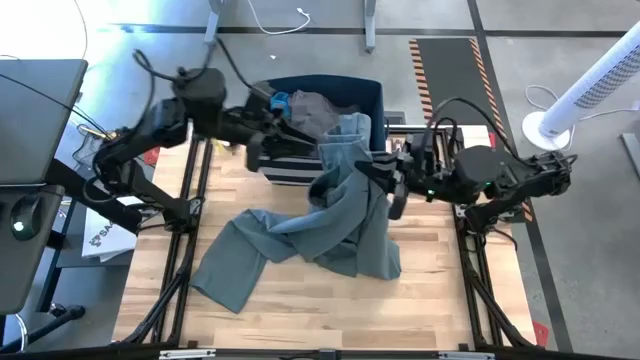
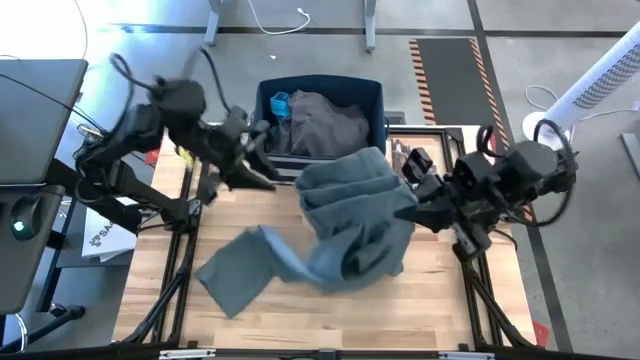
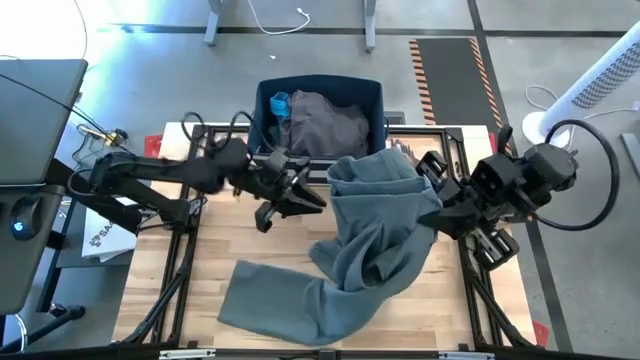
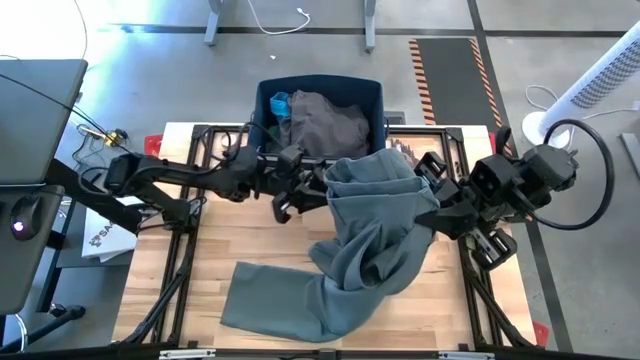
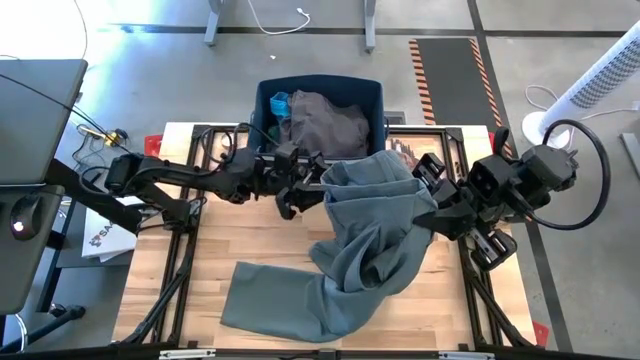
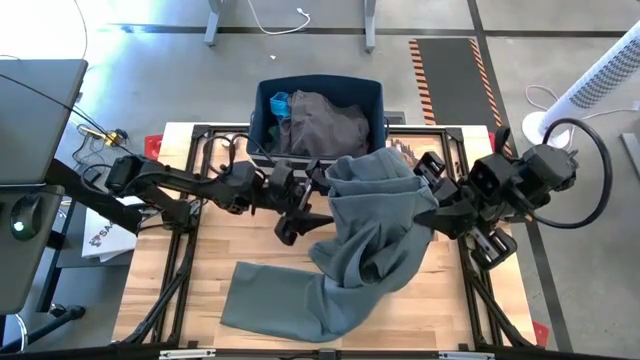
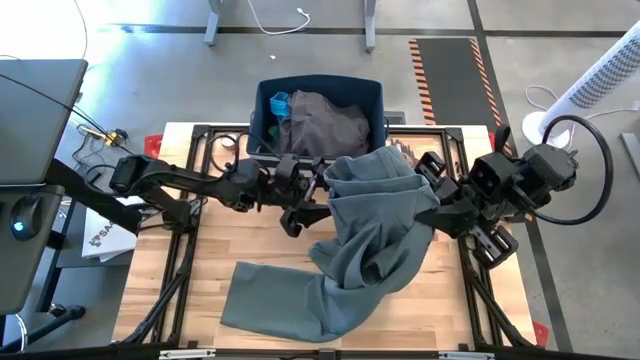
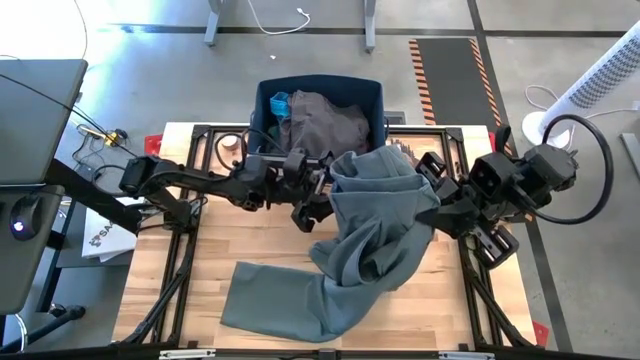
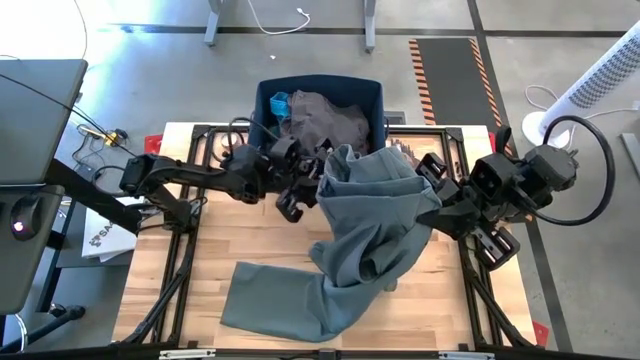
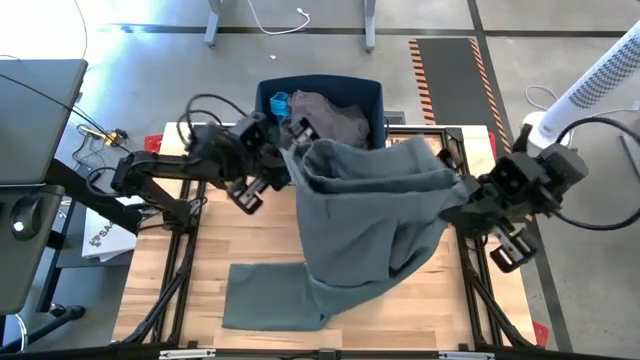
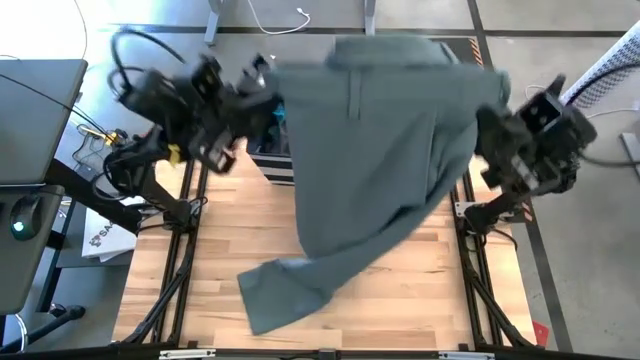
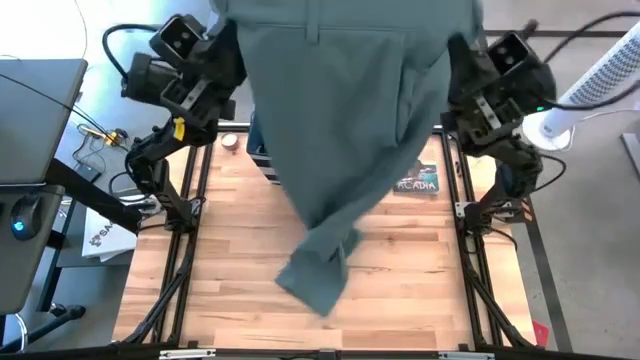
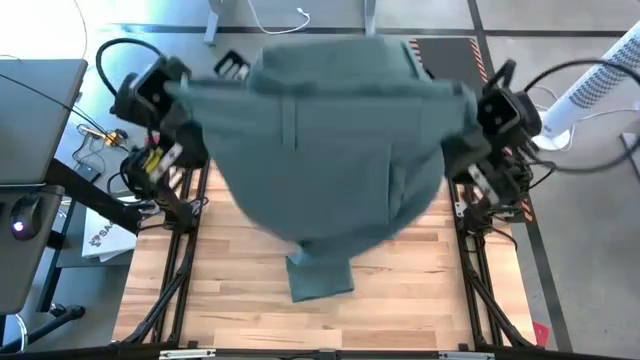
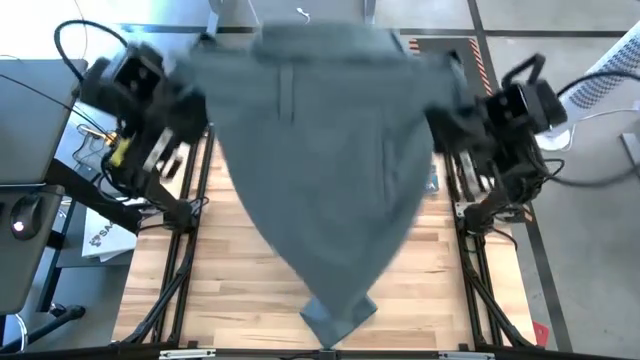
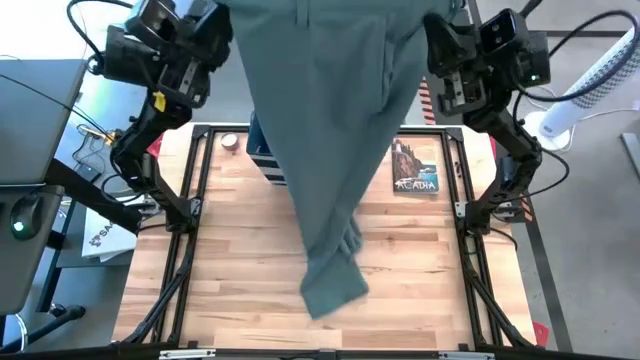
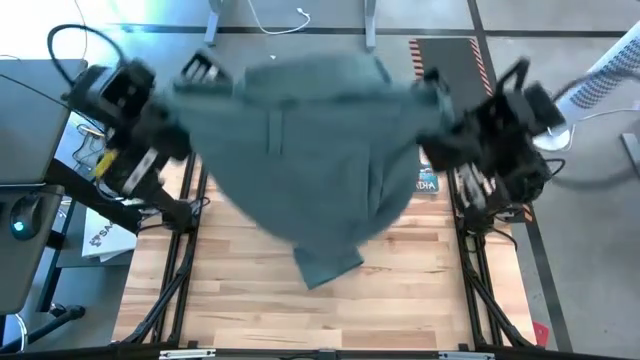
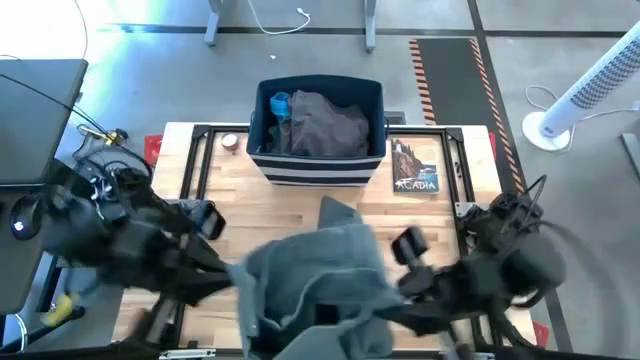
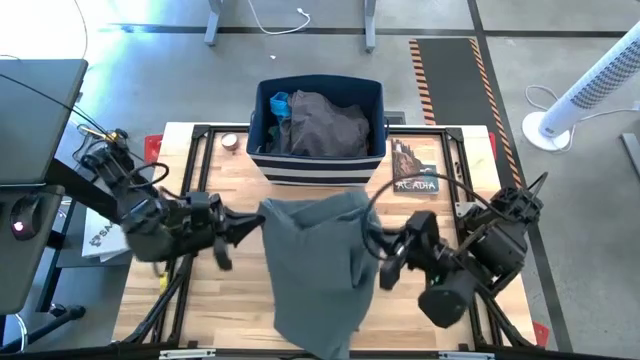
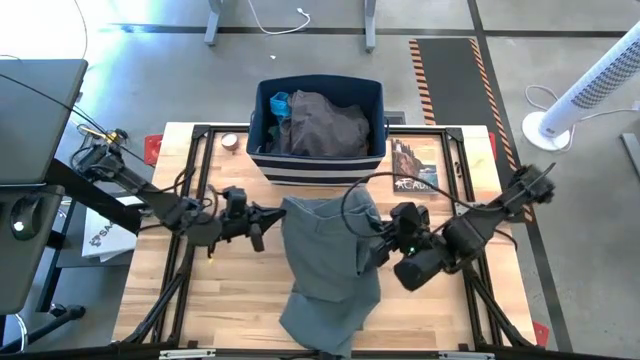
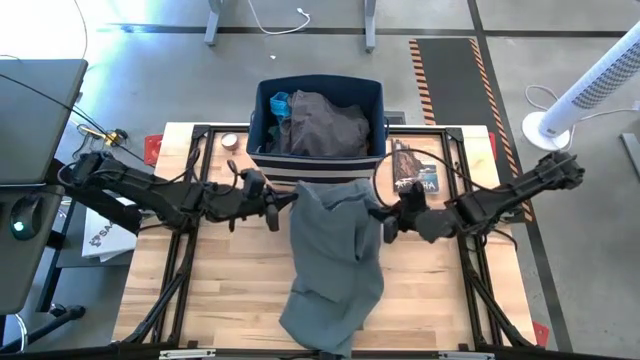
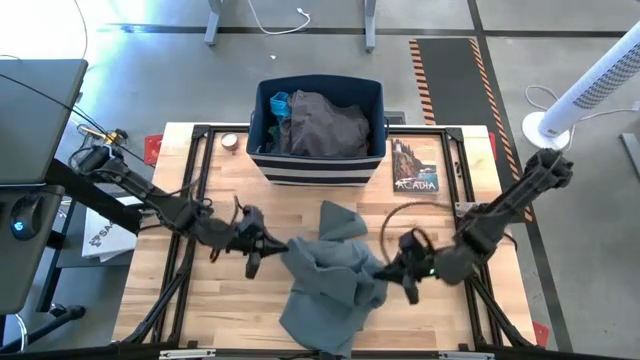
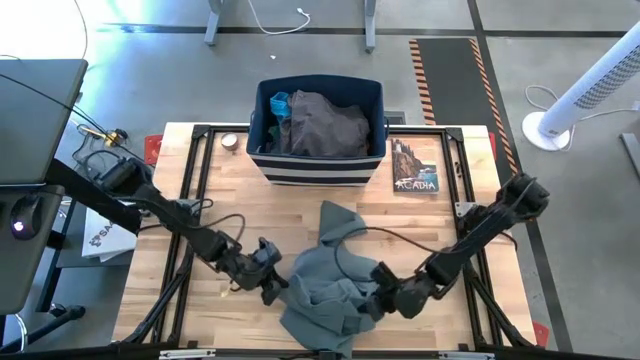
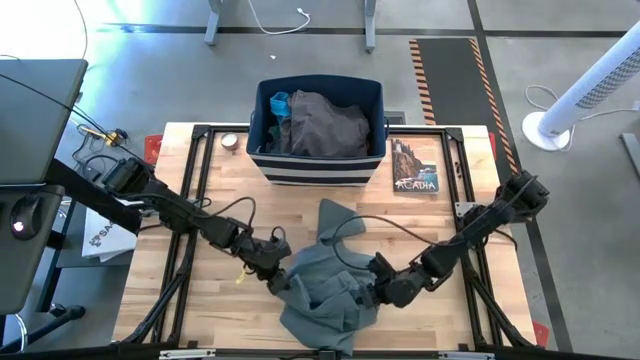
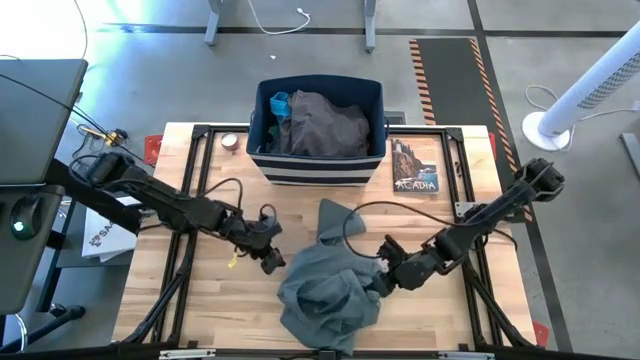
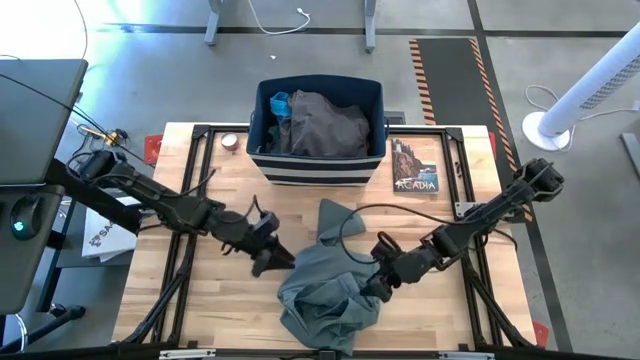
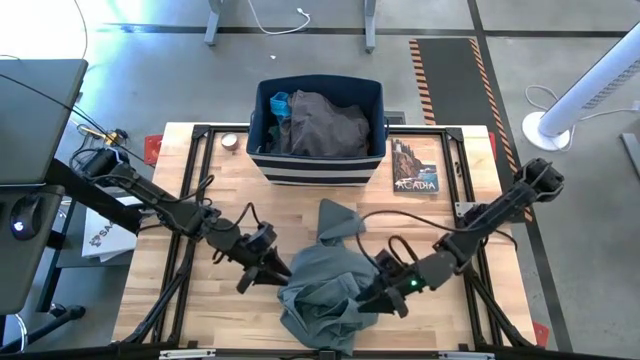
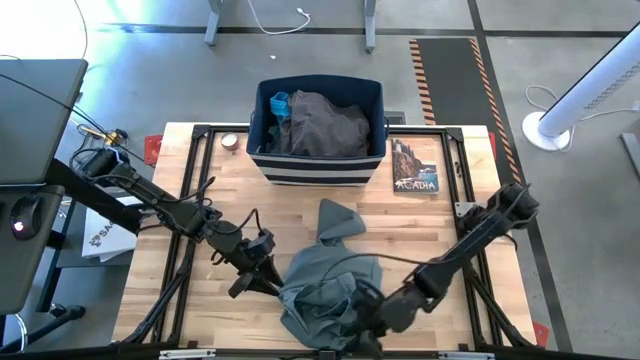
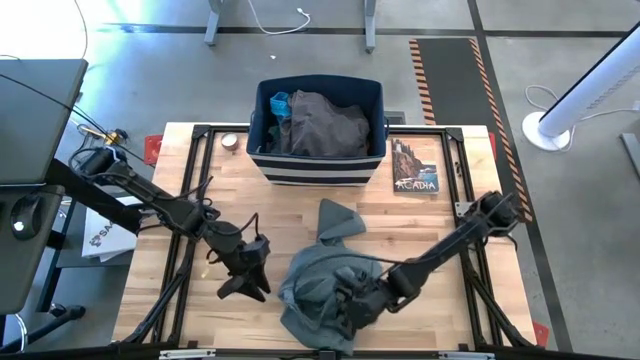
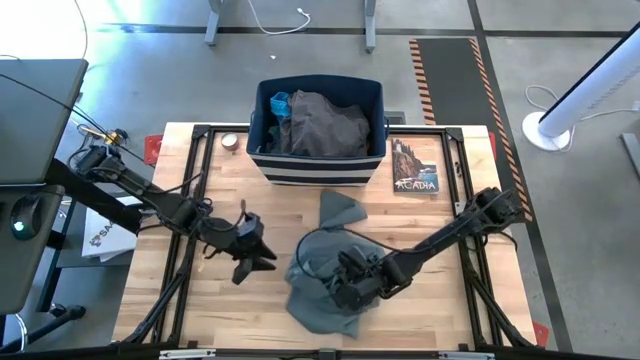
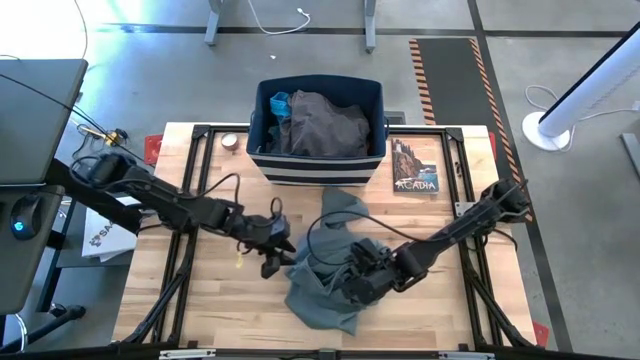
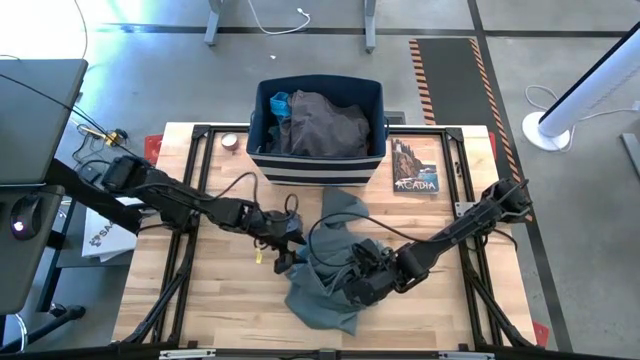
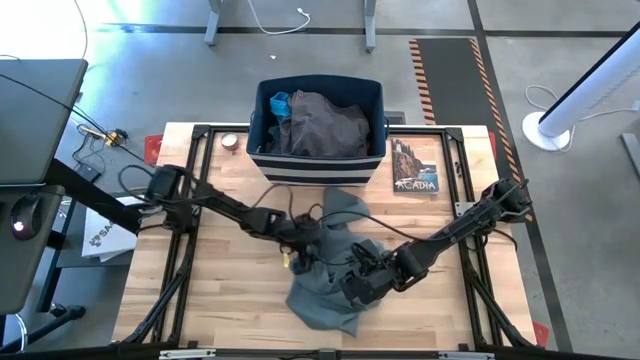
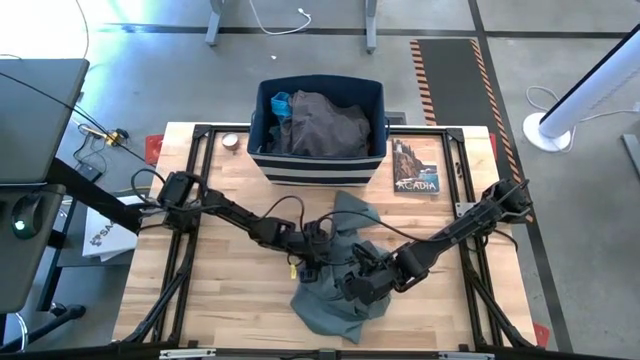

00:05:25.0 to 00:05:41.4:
Task: Sort clothes
Fold the blue pants

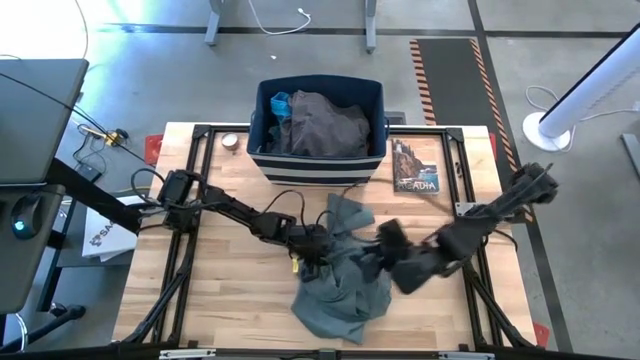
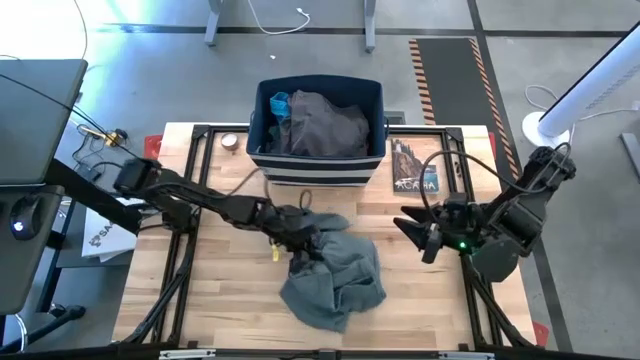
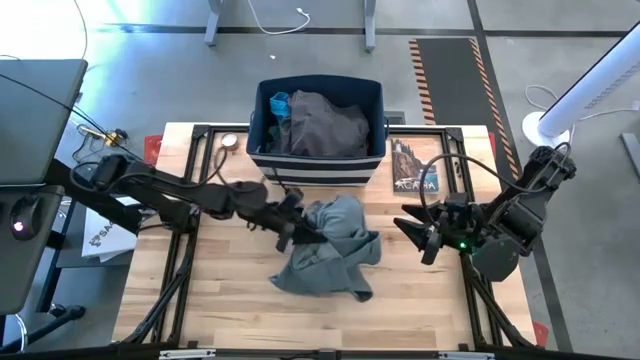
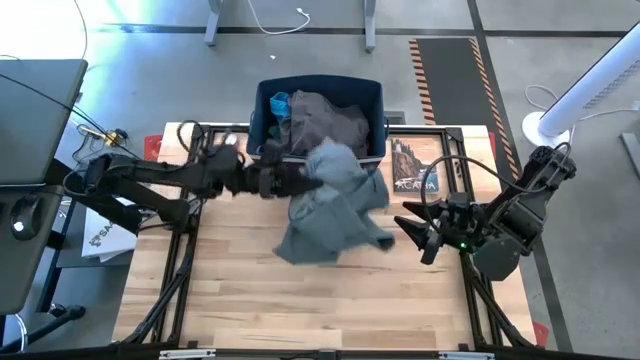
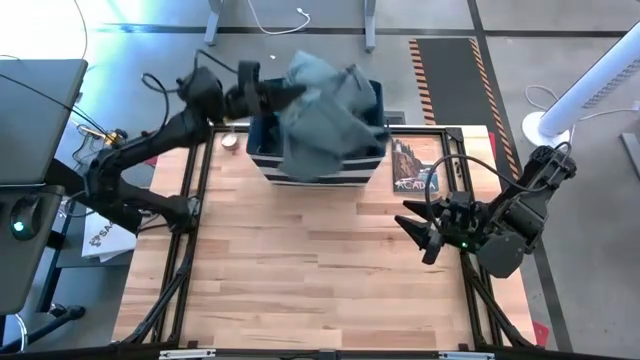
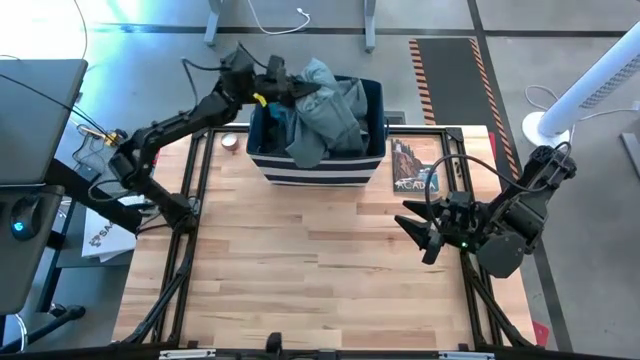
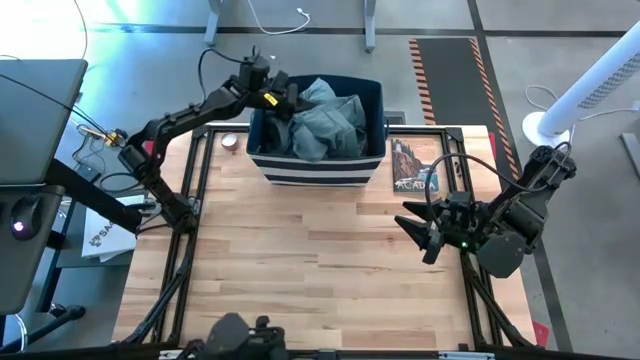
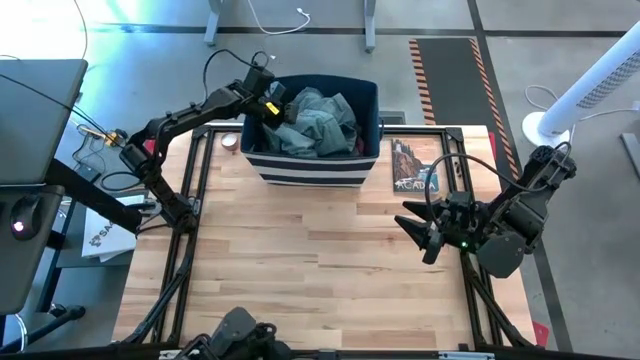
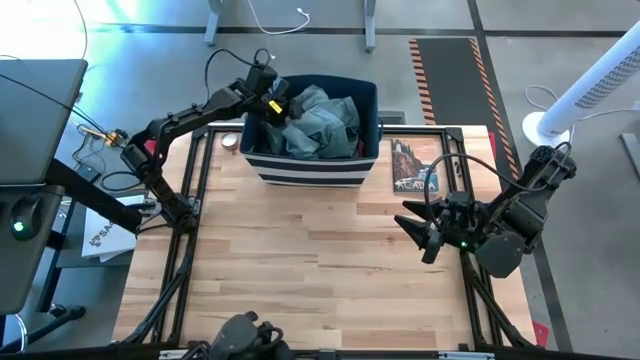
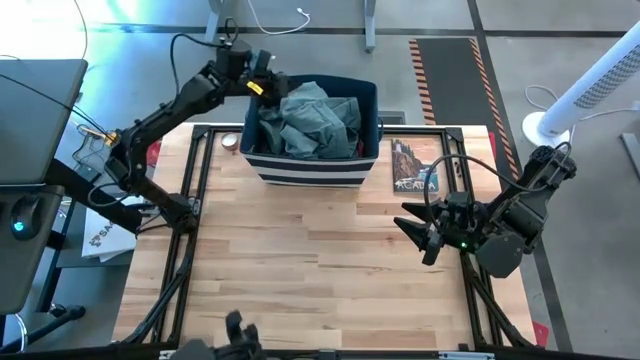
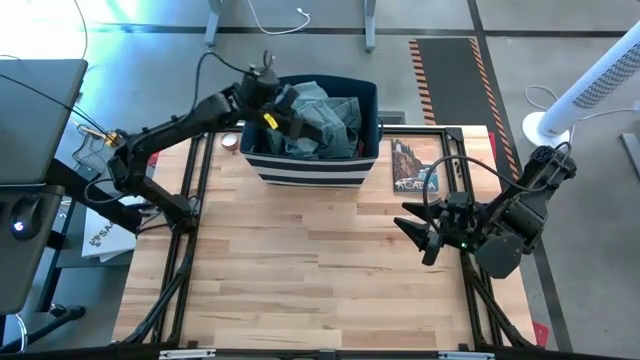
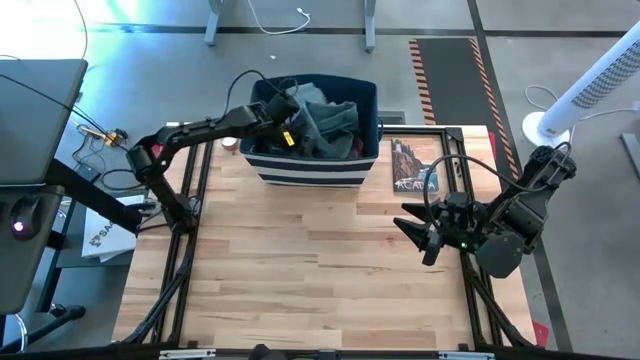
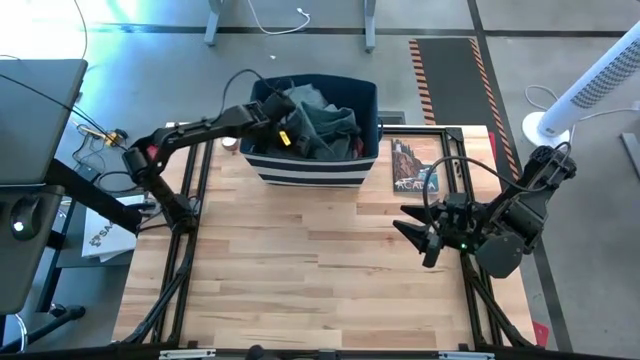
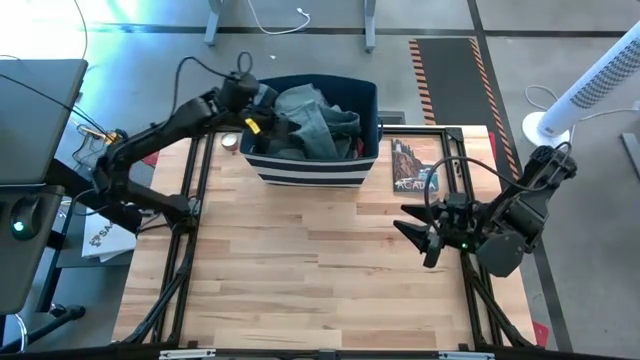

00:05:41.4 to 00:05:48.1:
Put the folded blue pants into the blue laundry bin
